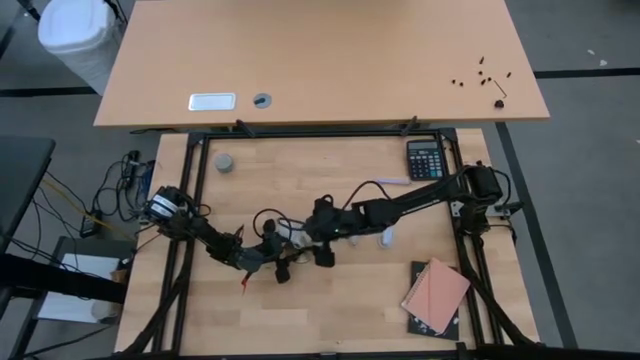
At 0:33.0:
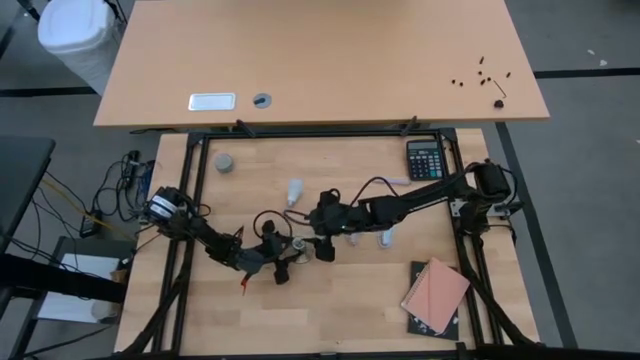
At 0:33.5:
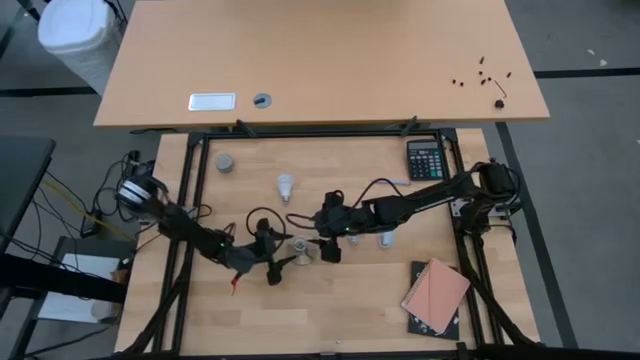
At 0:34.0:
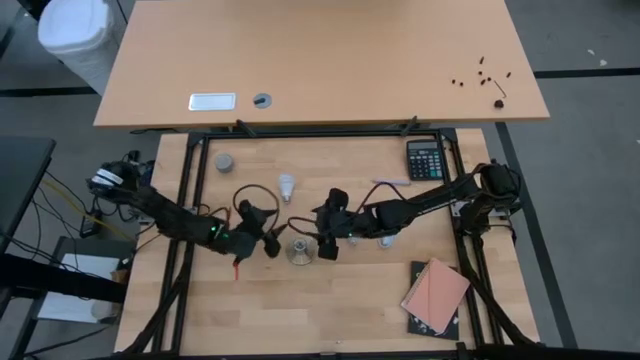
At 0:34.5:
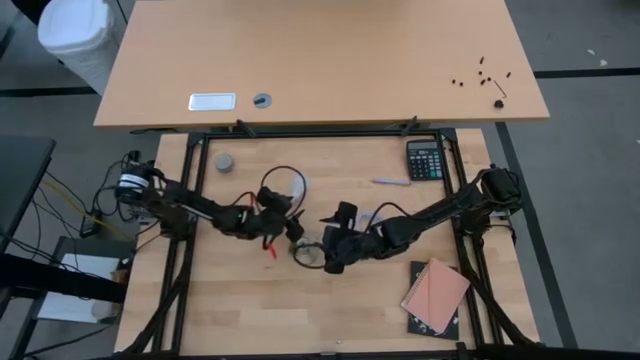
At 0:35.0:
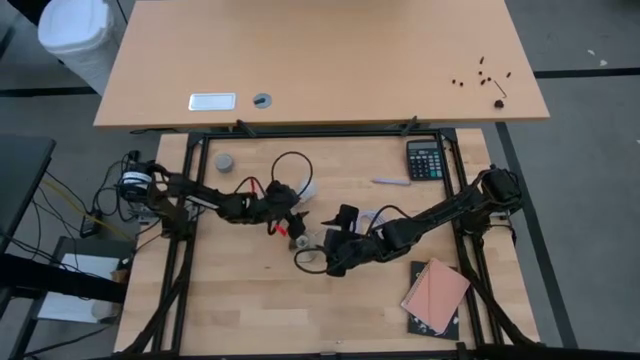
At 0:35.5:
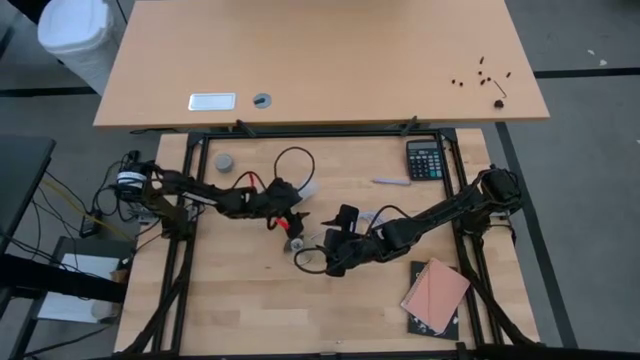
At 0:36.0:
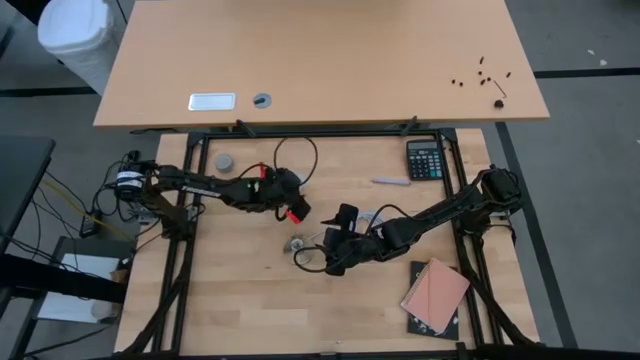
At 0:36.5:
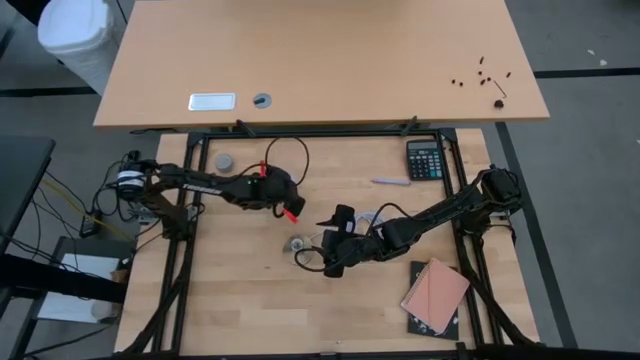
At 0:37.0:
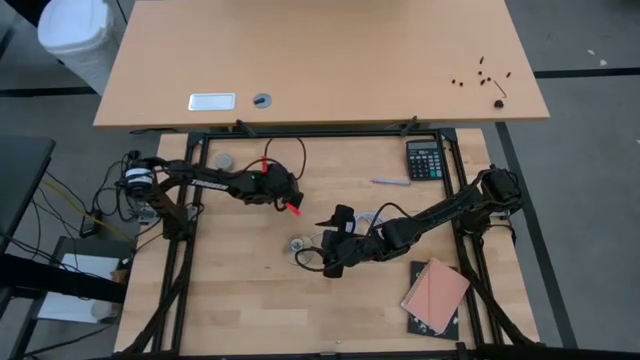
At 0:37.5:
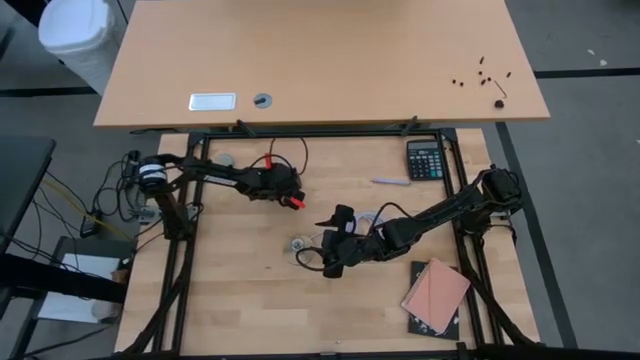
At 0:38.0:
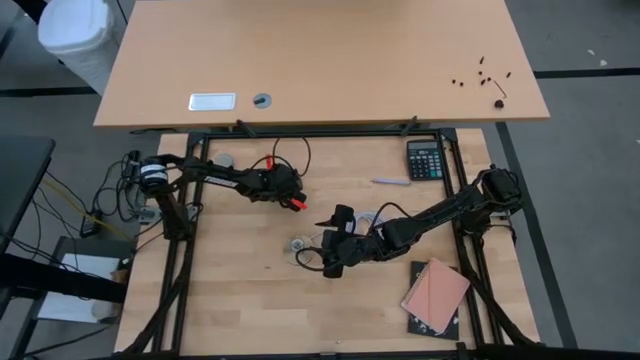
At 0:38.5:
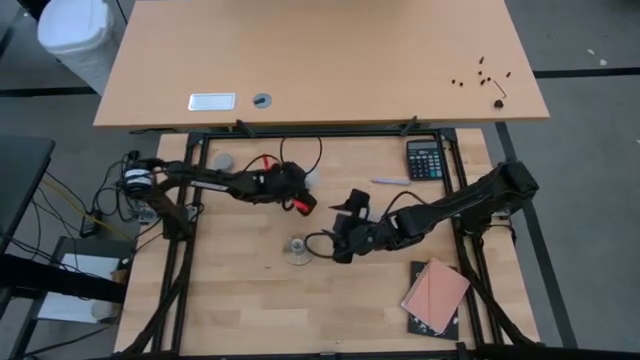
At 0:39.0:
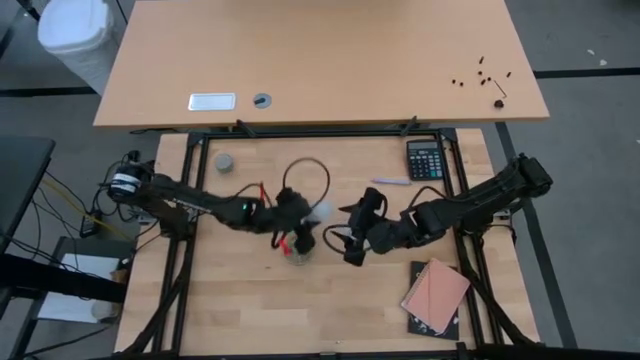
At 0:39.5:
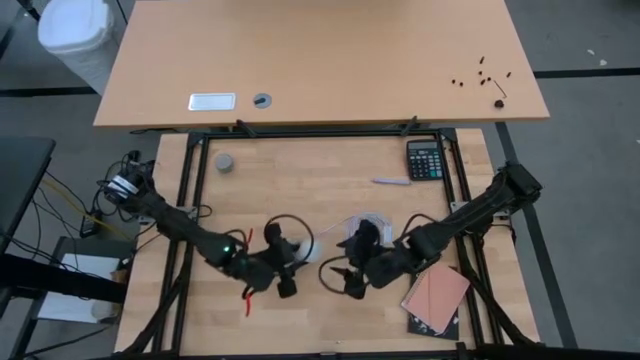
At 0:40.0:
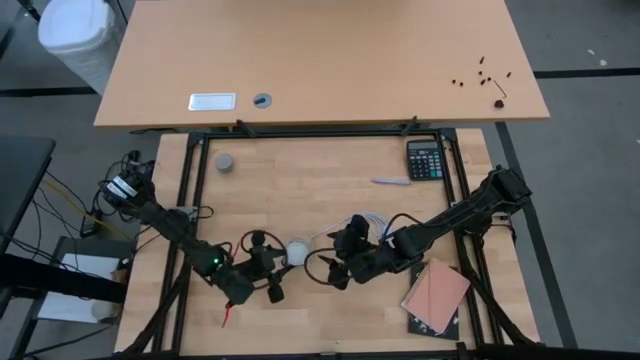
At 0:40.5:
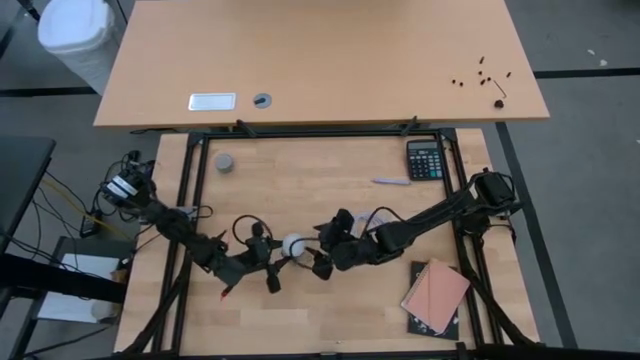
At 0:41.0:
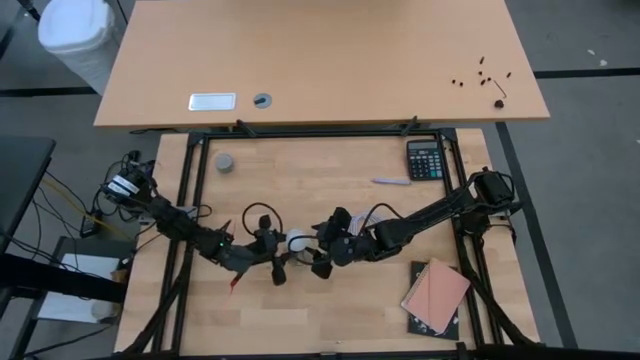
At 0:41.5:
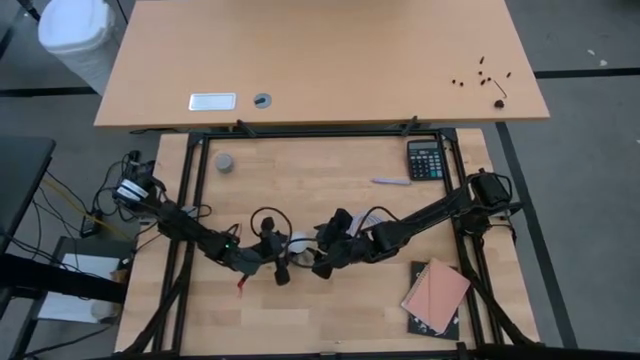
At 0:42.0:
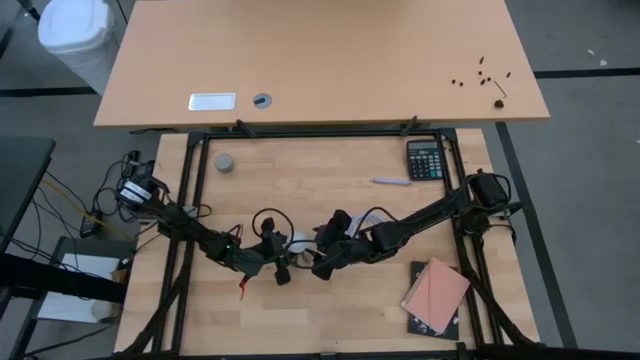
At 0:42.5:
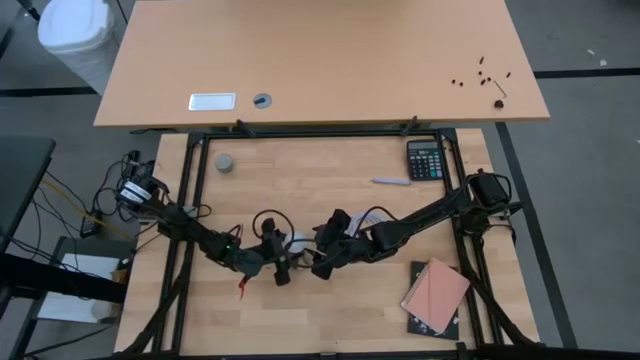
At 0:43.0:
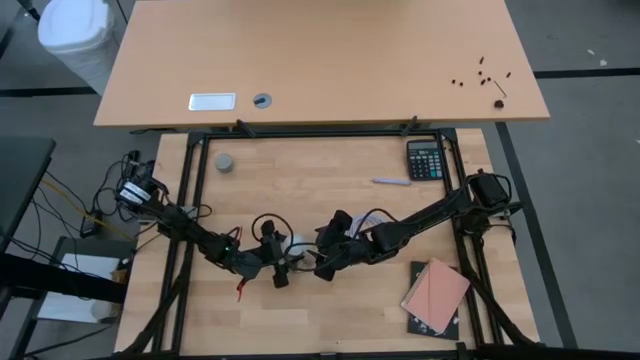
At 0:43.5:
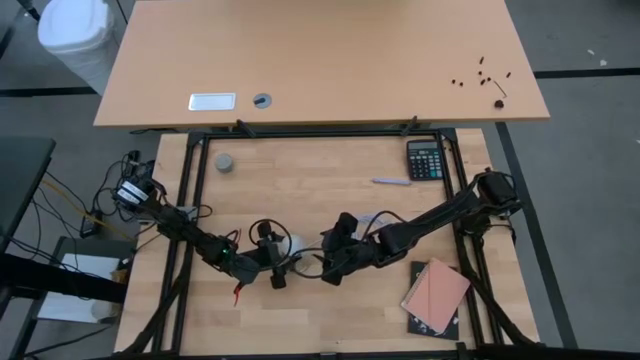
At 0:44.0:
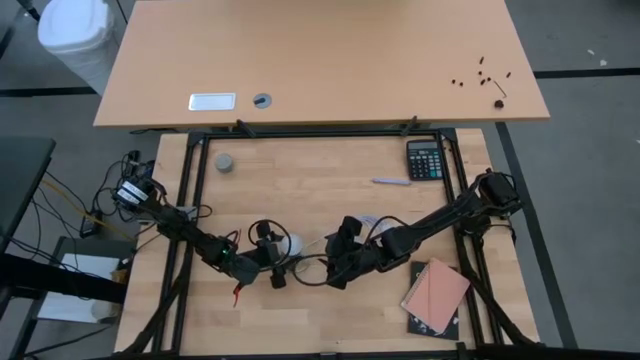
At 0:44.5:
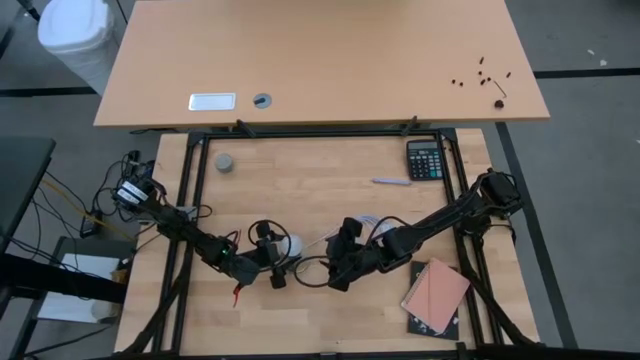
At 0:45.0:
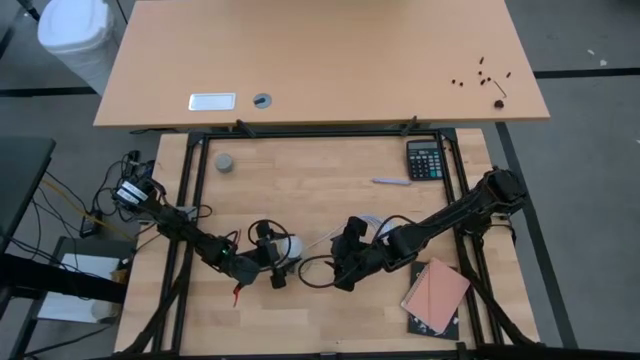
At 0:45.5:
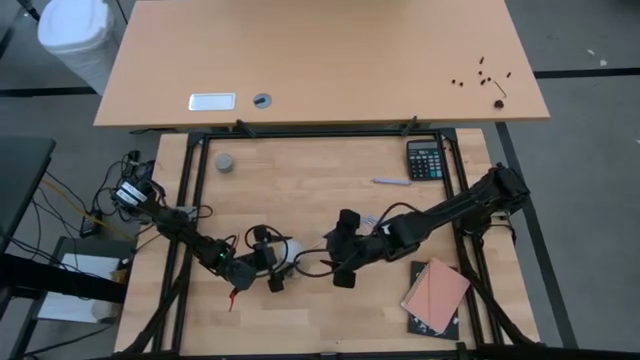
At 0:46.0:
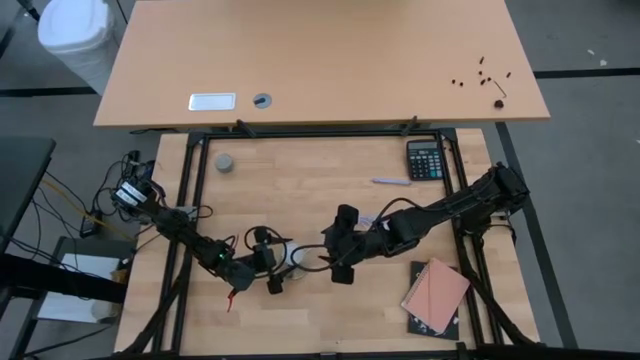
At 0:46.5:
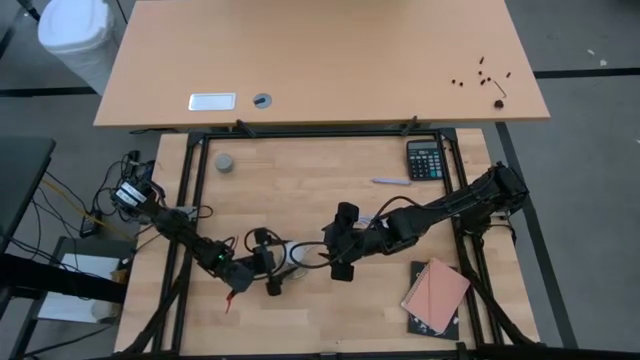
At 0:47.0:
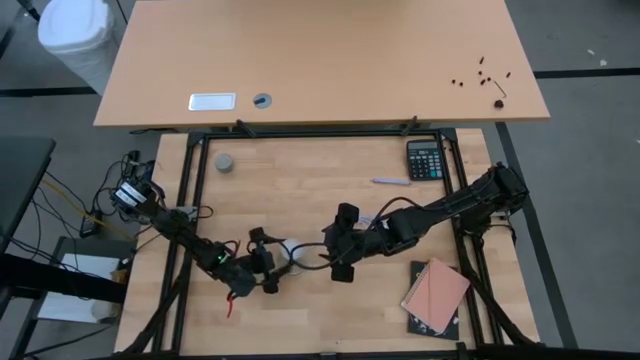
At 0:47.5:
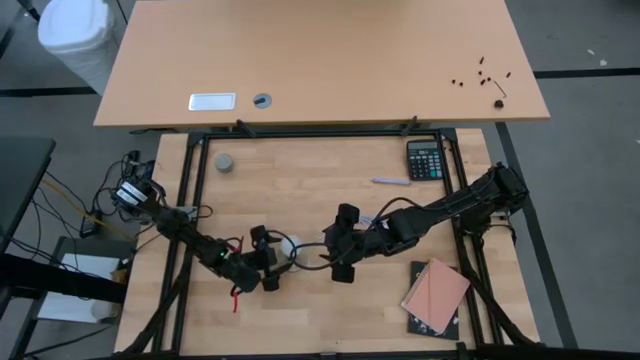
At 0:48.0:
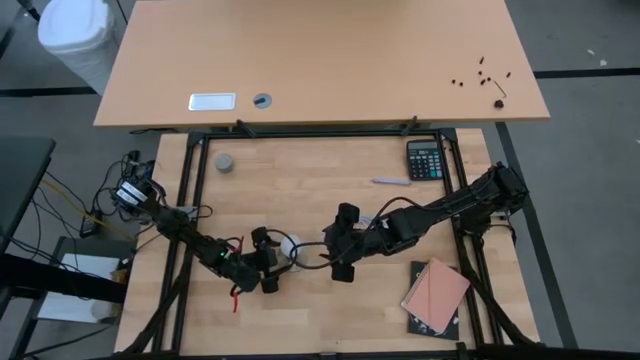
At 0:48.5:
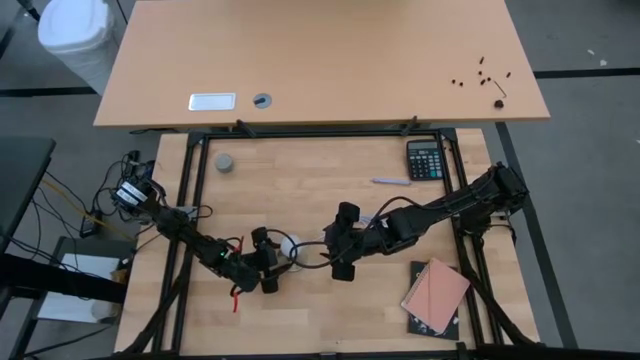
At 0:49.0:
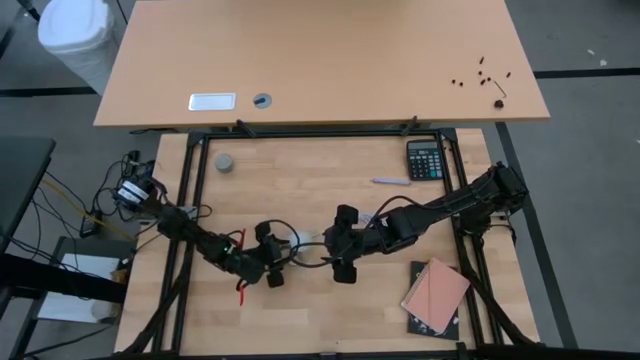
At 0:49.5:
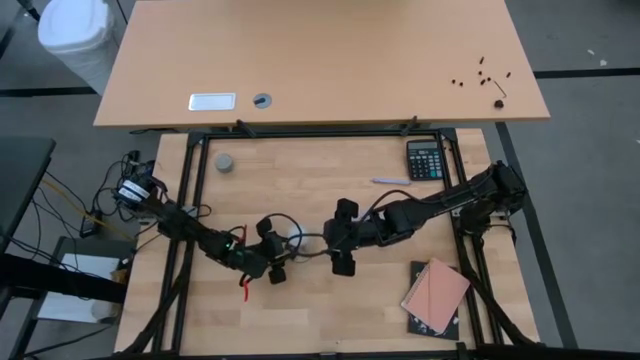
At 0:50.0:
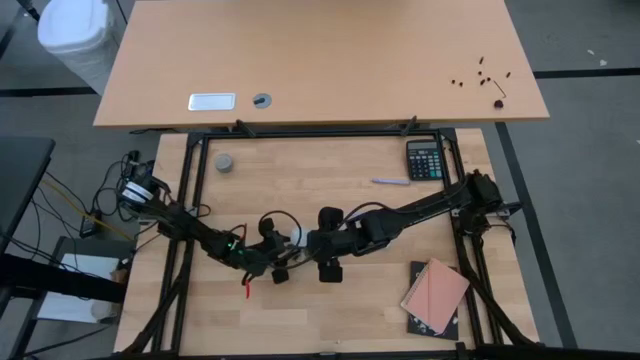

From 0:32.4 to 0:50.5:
Task: Screw lightbulb
Insert the lightbulb into the bronze lamp socket

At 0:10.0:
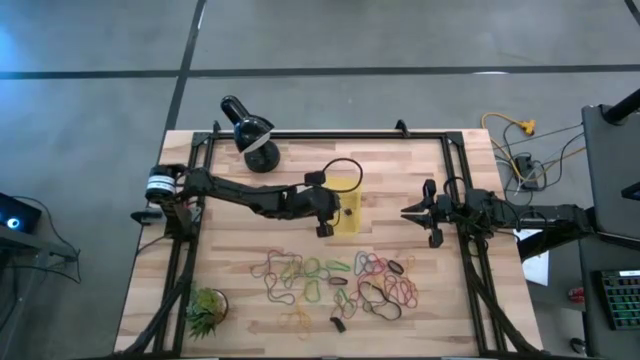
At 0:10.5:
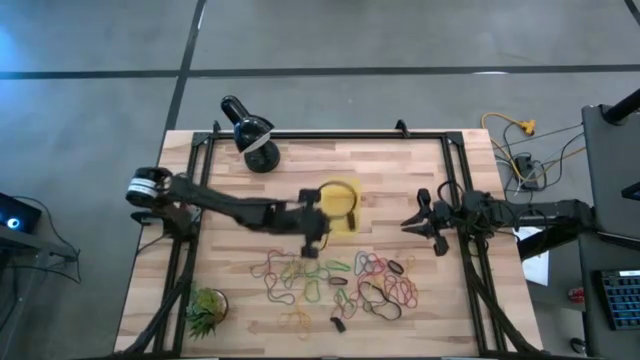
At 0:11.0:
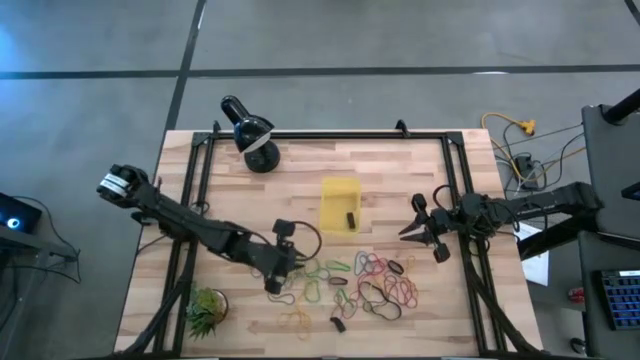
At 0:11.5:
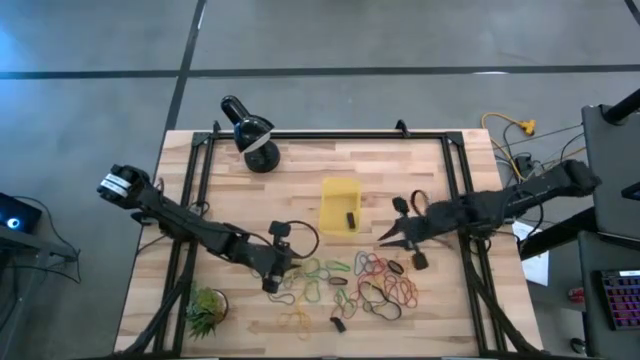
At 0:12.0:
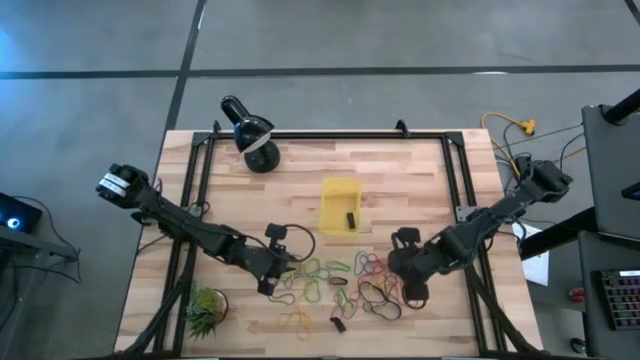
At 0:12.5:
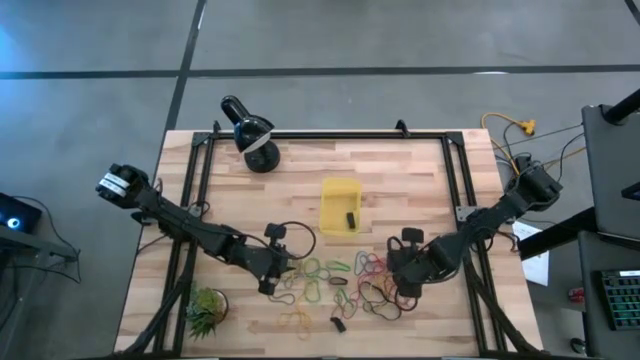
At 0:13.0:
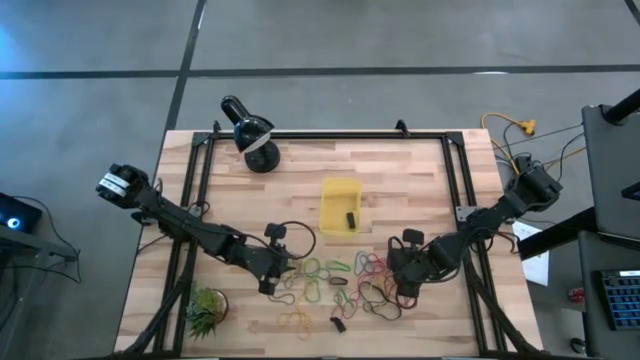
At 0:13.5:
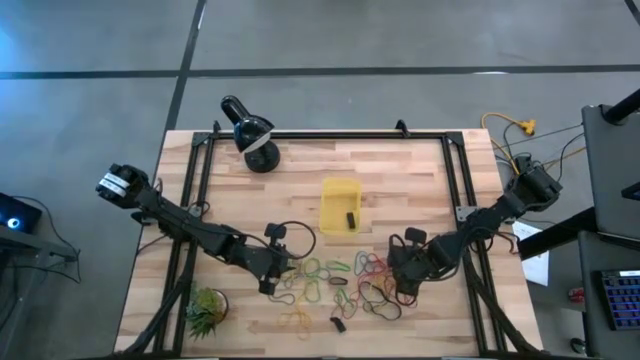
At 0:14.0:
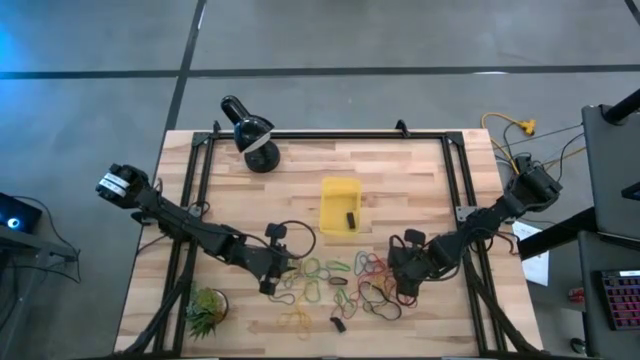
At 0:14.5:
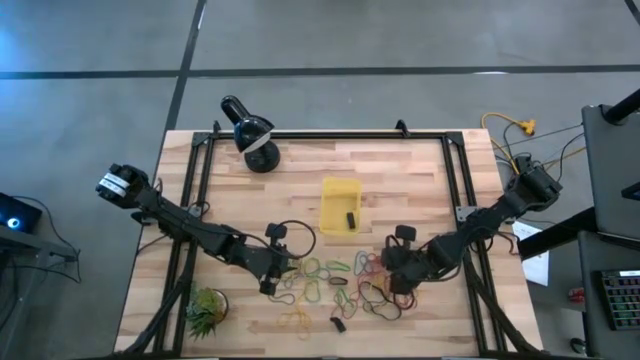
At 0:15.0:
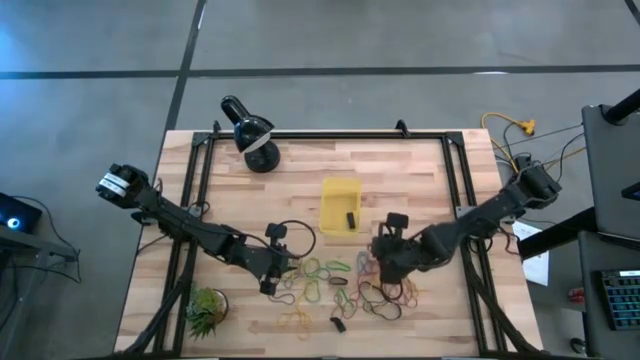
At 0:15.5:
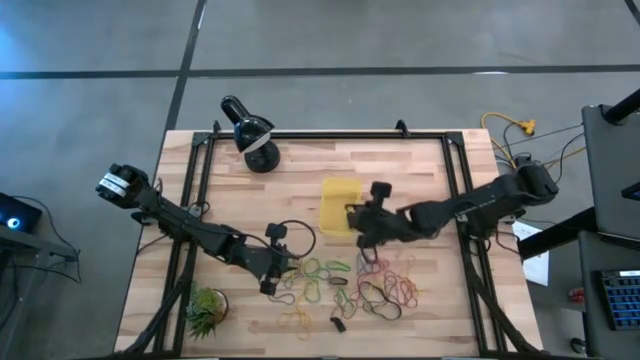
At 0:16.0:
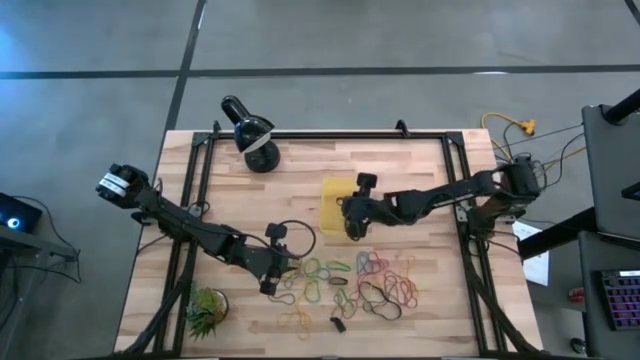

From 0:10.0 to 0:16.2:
Task: Pick and place rubber bands into bin
Put the black rubber band into the yellow bin
